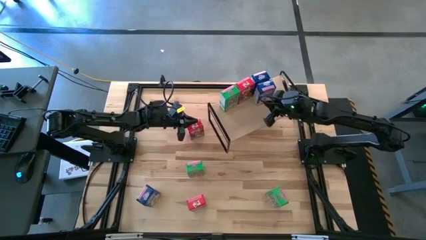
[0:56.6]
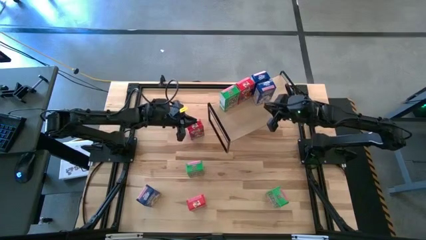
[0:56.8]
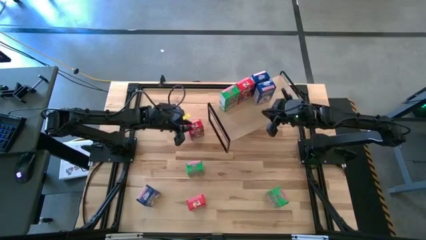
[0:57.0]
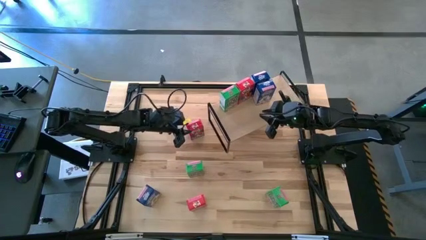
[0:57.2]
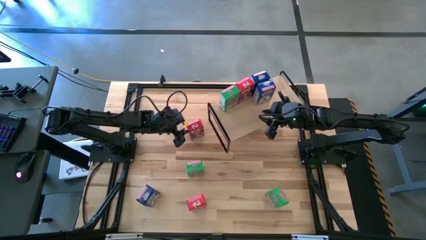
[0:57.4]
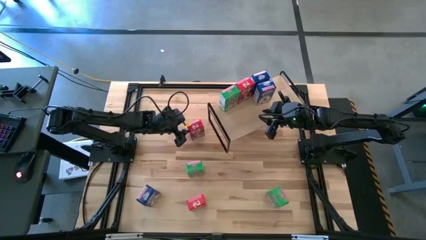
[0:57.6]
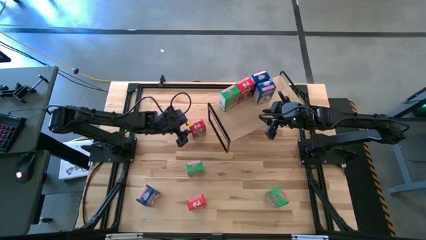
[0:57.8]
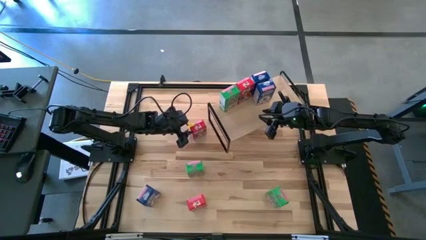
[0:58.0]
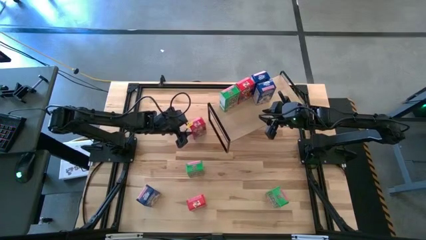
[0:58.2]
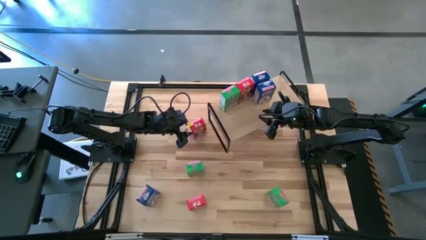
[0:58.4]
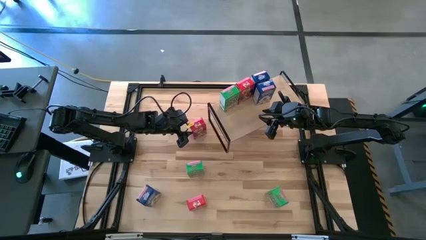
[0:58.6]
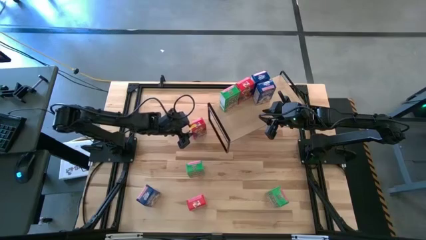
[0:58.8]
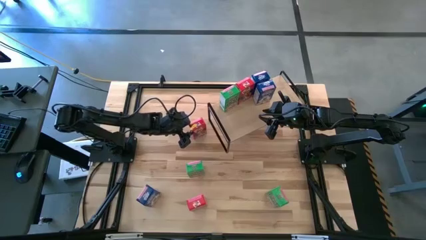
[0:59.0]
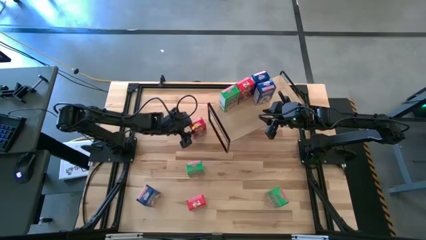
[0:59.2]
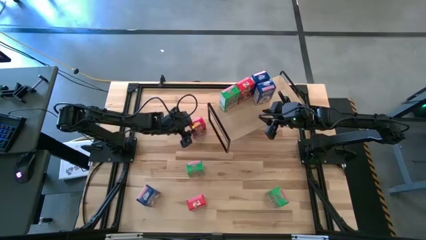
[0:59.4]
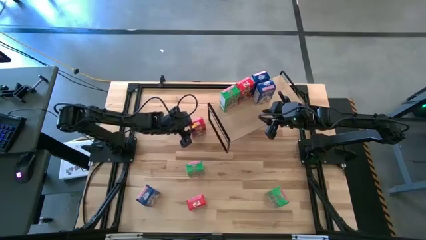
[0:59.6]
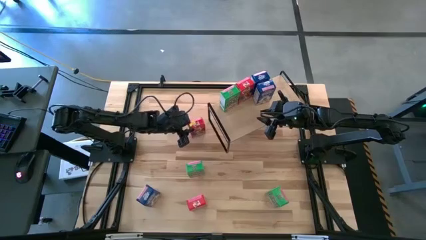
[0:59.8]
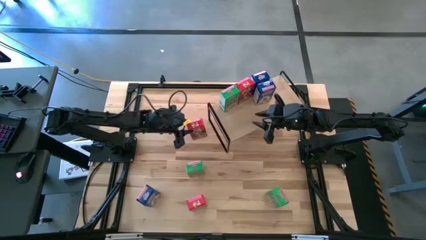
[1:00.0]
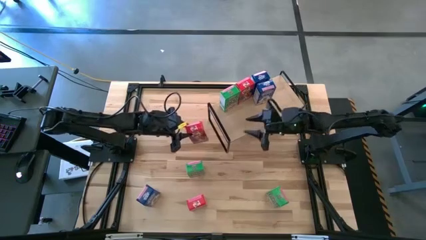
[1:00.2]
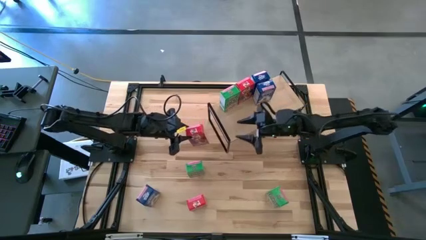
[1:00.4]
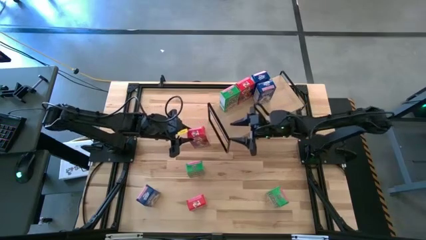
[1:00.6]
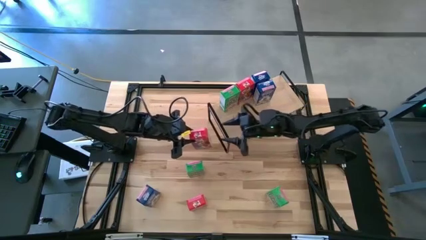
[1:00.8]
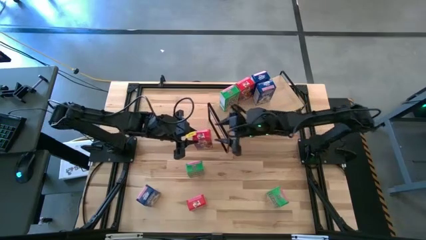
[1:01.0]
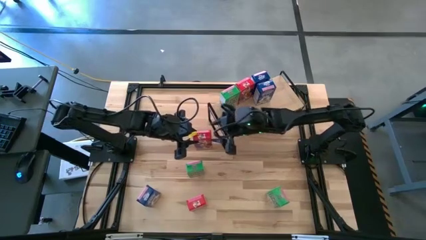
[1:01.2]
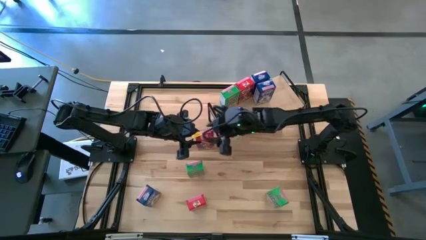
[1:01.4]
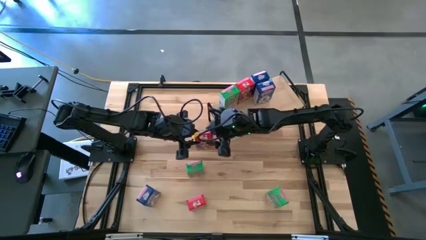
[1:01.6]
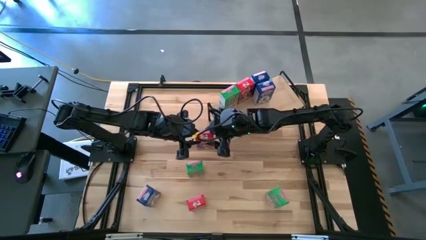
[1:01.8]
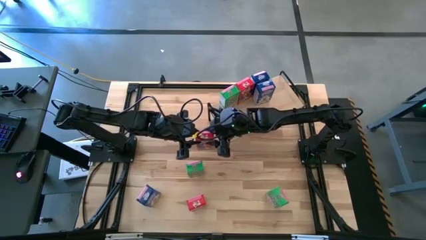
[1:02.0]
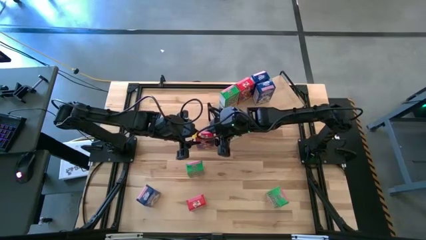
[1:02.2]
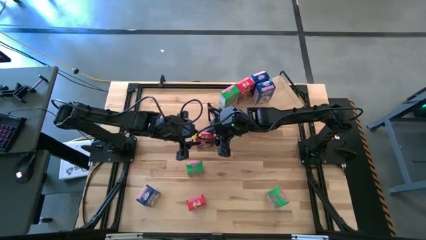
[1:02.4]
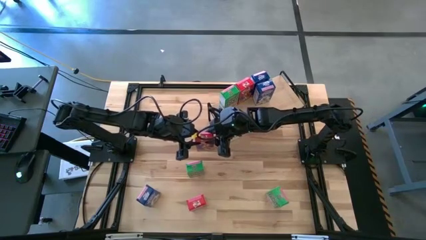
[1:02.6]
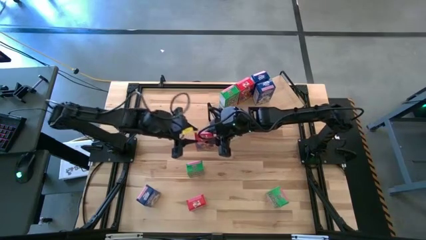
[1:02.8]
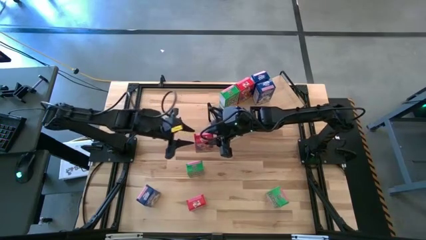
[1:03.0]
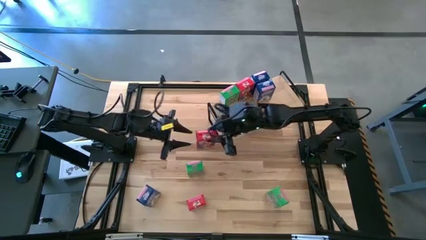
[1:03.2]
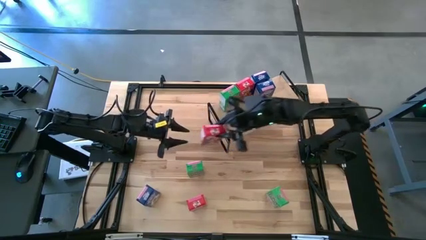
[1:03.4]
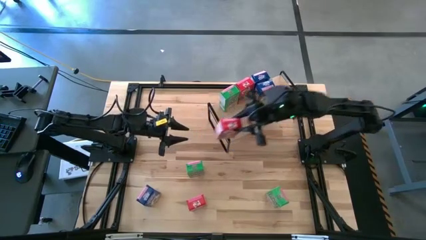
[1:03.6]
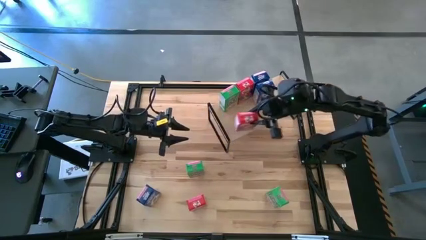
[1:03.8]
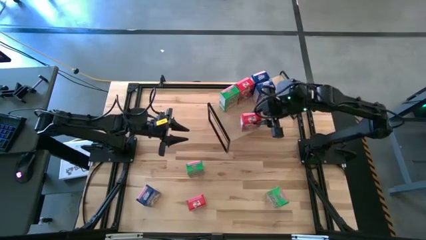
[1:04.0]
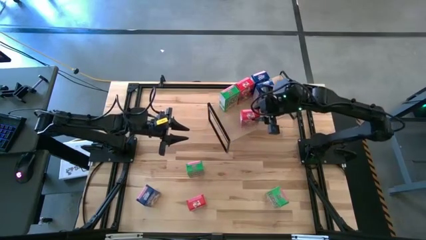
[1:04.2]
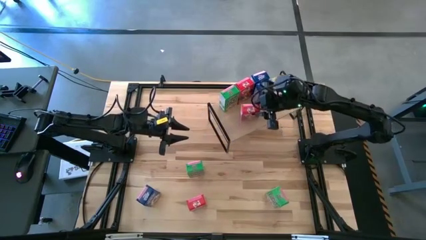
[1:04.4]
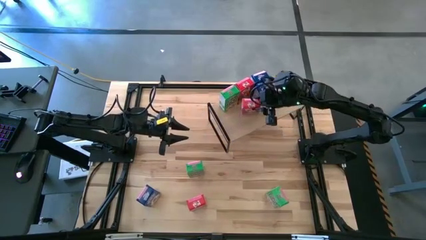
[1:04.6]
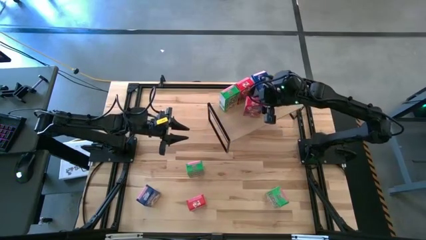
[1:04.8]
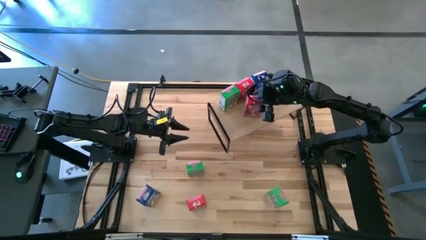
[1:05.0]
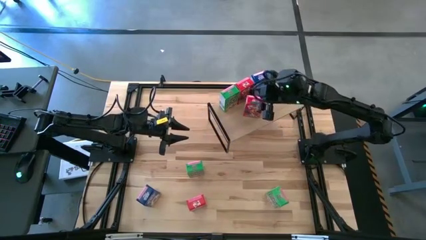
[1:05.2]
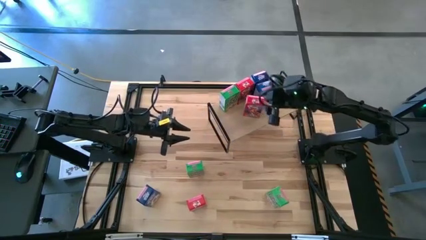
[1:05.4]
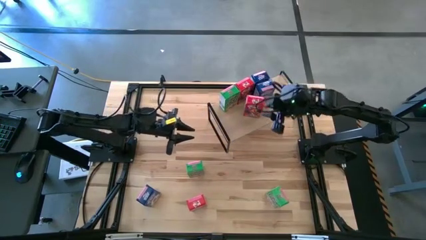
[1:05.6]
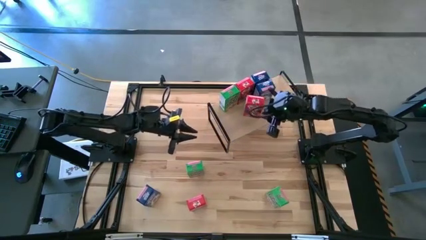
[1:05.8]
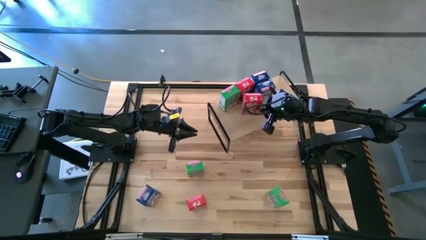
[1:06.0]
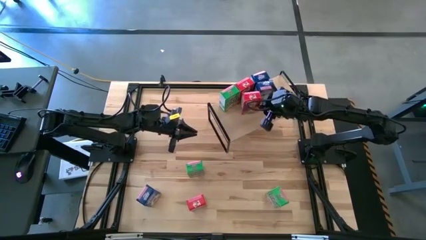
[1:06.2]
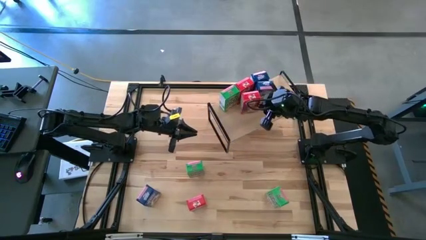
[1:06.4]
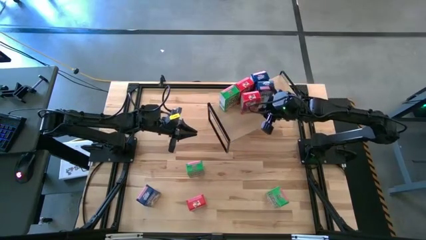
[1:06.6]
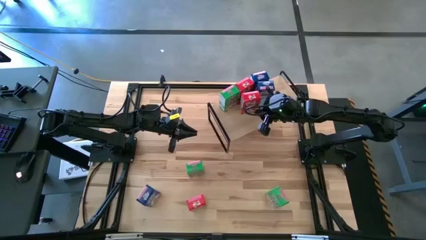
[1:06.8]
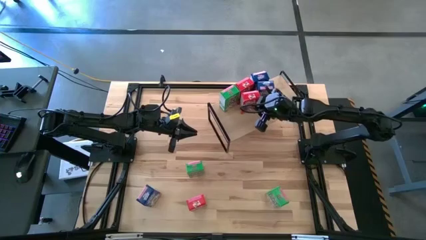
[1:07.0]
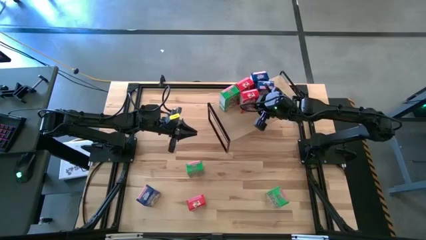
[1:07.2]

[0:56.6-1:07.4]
Task: Stack cereal on shelf
Put the top red cereal box on the shelf and aligned with the other red cereal box

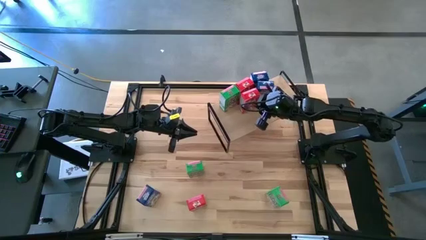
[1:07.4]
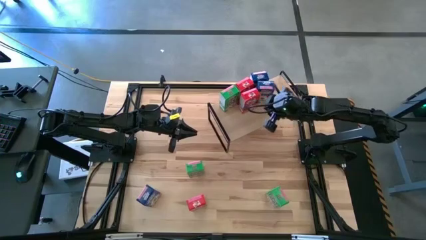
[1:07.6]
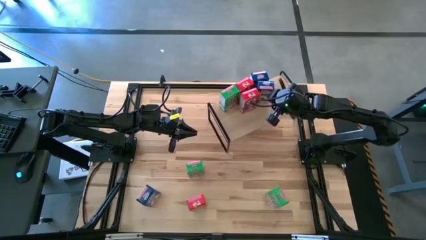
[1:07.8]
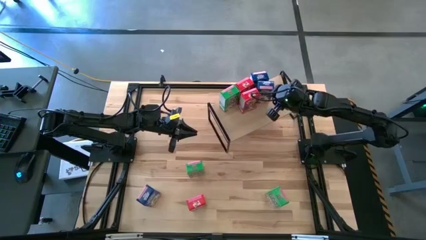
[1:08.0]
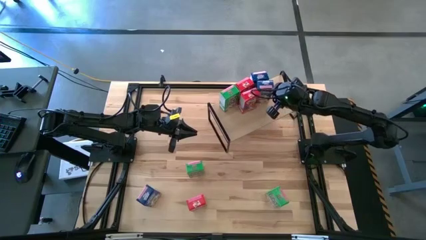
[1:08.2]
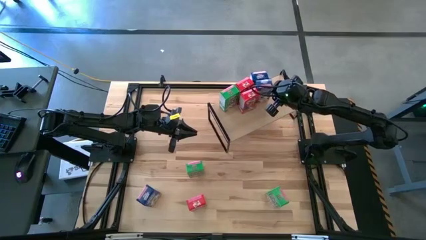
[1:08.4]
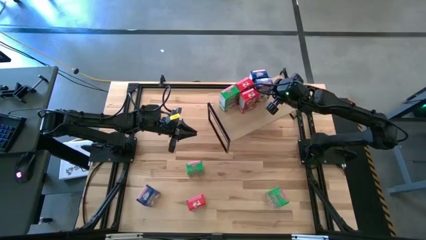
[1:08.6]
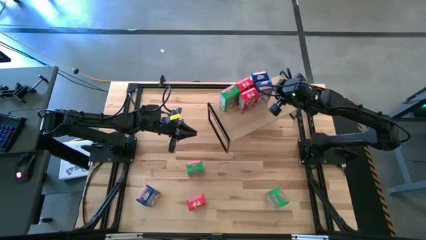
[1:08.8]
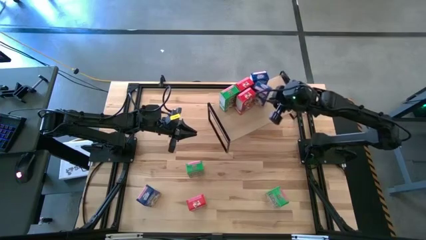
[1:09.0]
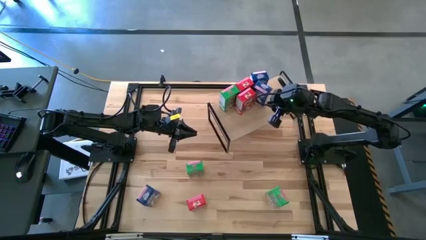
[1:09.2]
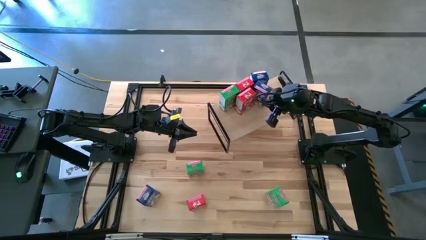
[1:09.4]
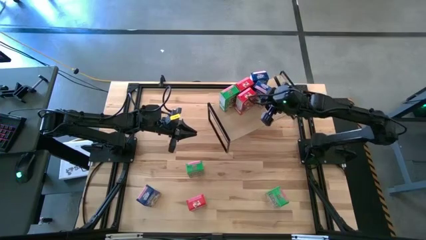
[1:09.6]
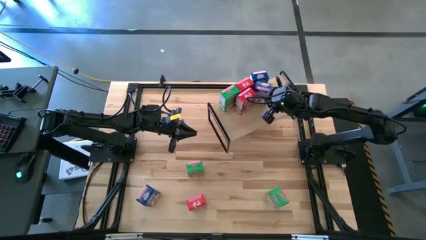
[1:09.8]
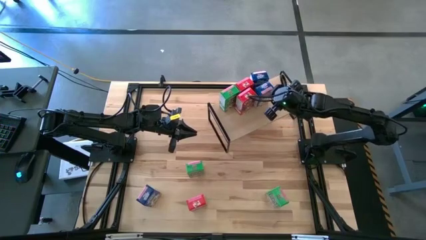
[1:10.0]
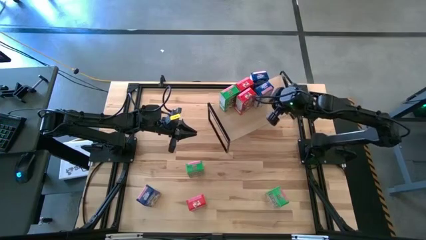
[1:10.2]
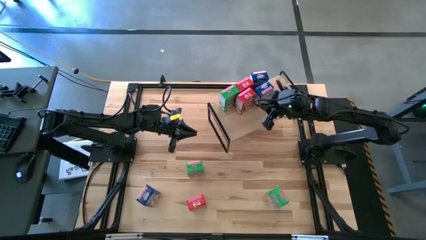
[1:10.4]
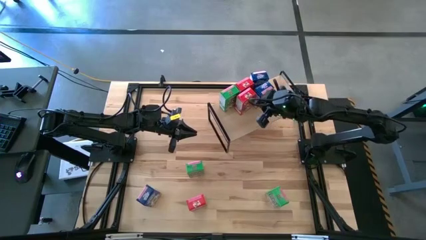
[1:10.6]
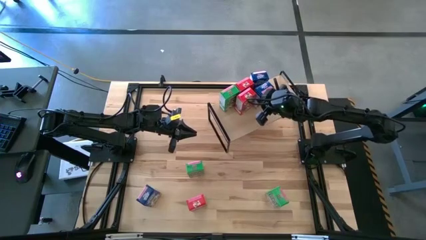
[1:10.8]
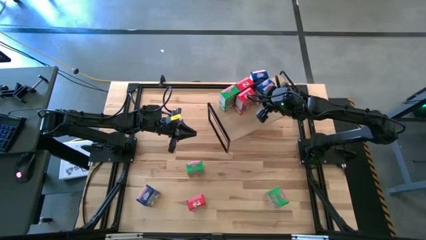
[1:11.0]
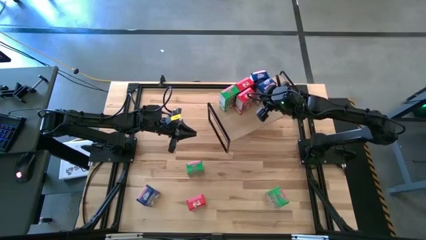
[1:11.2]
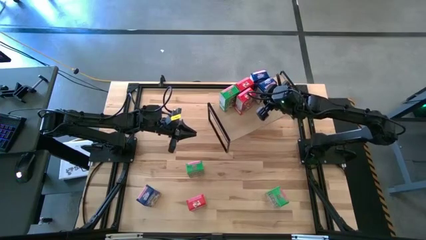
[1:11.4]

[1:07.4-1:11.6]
Adjust the blue cereal box

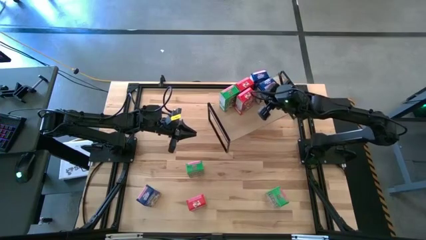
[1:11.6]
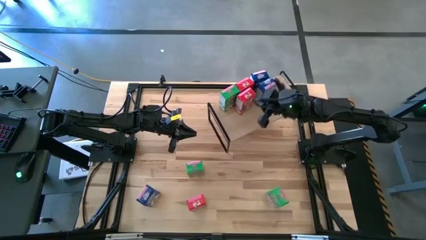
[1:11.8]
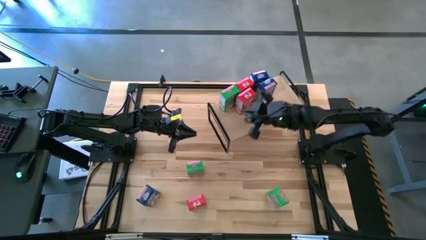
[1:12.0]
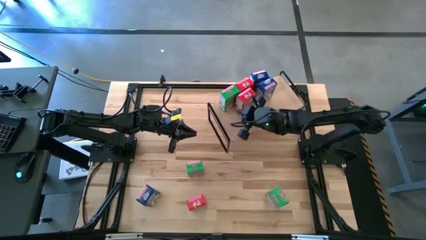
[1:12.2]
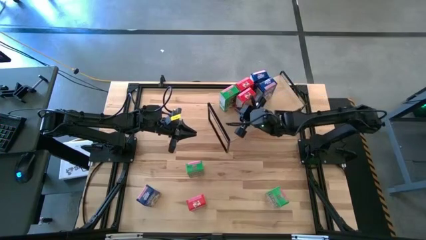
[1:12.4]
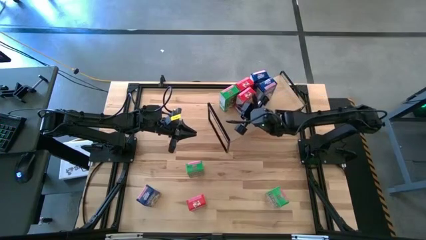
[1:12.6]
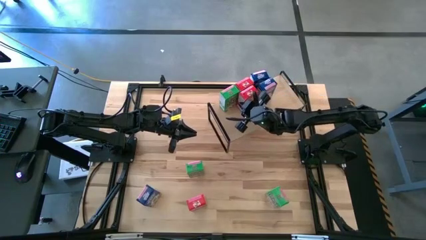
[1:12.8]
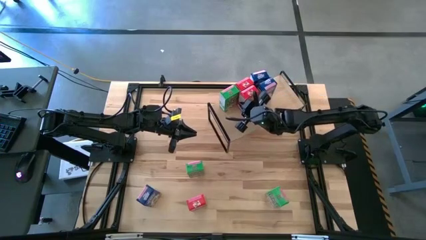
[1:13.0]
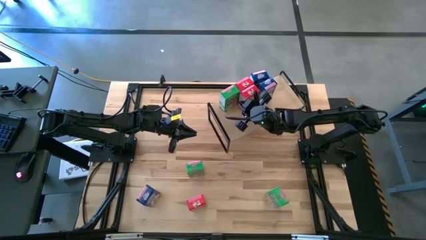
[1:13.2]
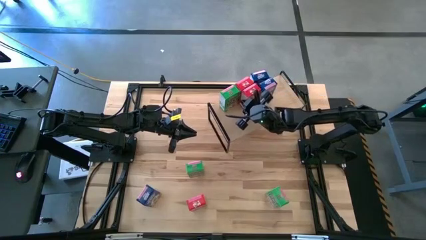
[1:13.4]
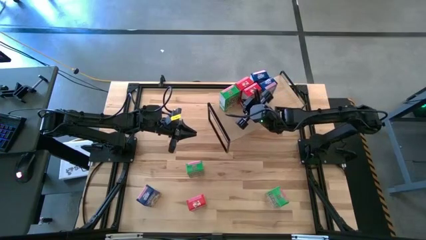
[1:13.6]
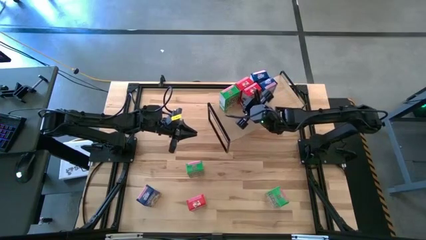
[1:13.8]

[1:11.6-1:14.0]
Adjust the red cereal
